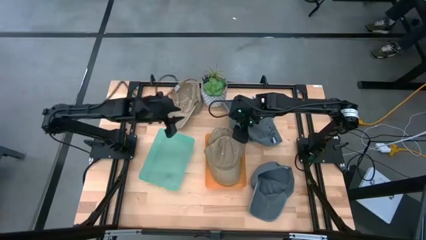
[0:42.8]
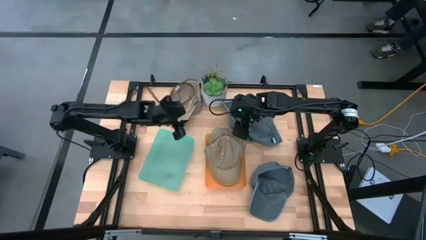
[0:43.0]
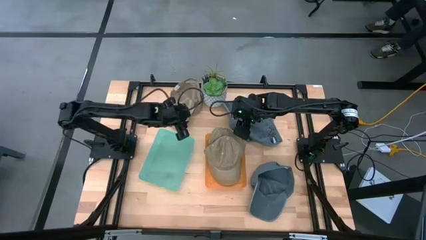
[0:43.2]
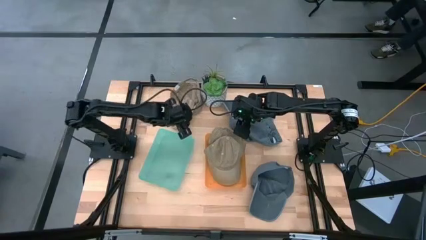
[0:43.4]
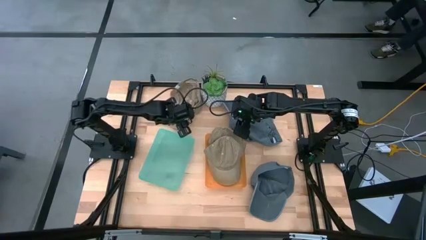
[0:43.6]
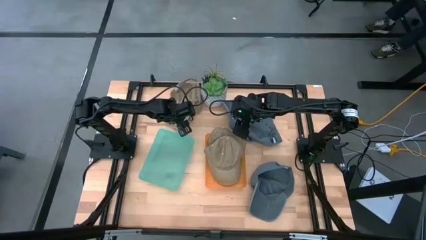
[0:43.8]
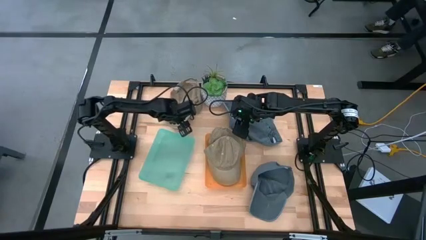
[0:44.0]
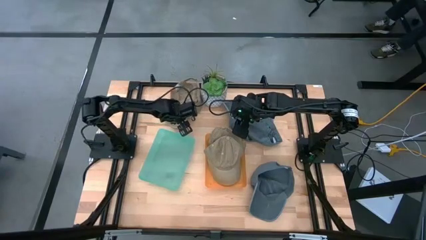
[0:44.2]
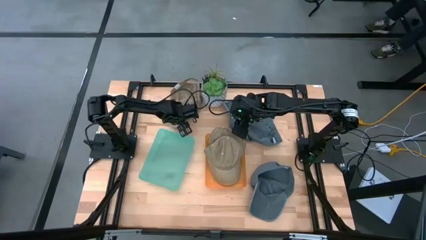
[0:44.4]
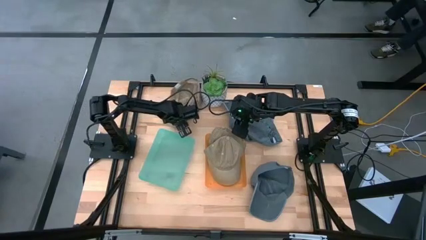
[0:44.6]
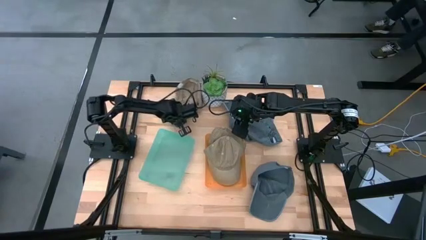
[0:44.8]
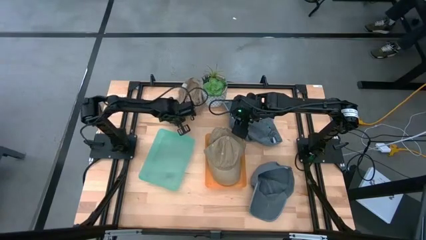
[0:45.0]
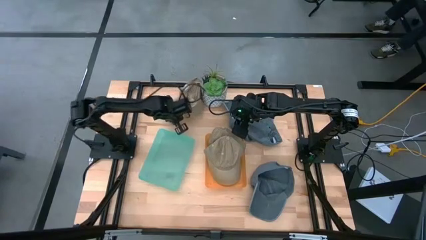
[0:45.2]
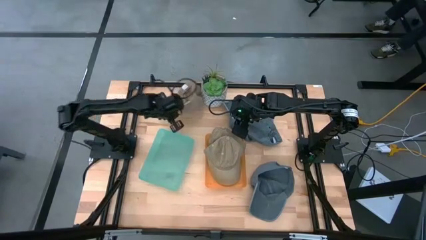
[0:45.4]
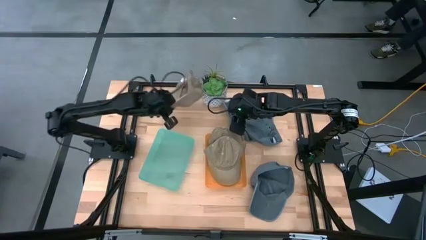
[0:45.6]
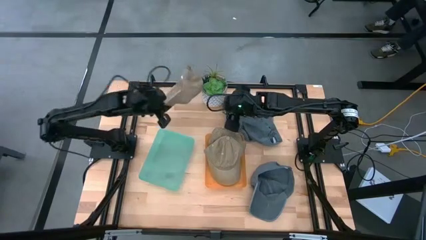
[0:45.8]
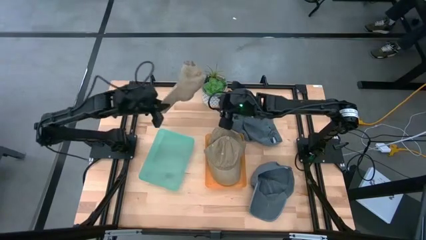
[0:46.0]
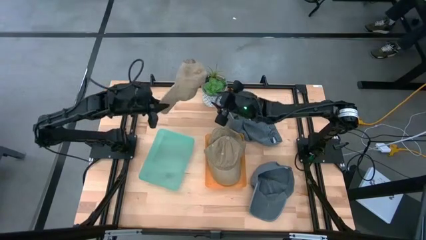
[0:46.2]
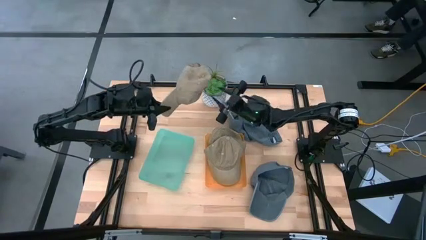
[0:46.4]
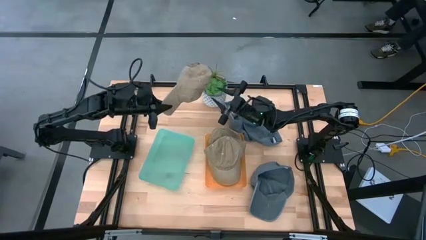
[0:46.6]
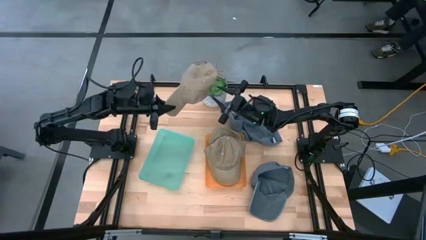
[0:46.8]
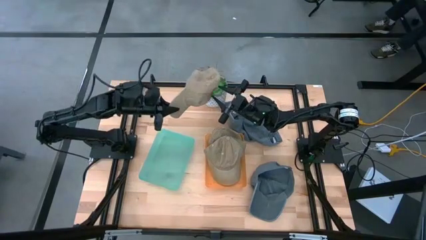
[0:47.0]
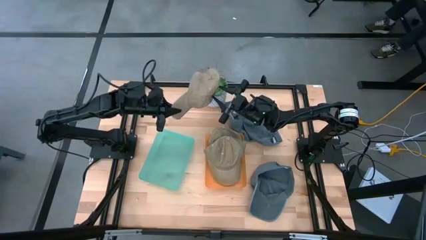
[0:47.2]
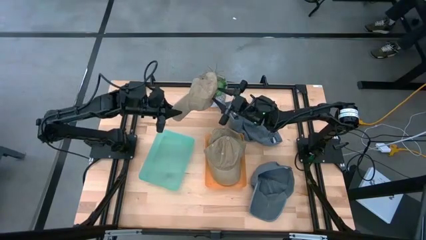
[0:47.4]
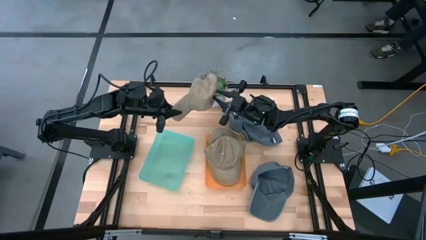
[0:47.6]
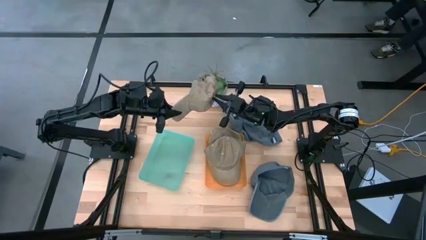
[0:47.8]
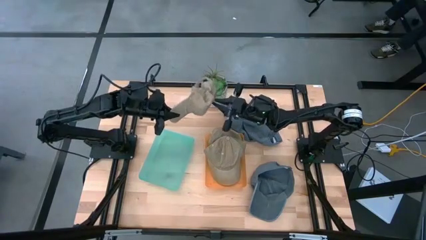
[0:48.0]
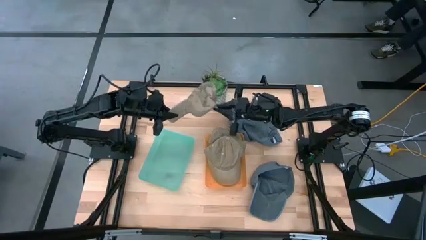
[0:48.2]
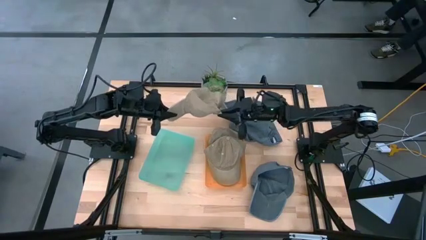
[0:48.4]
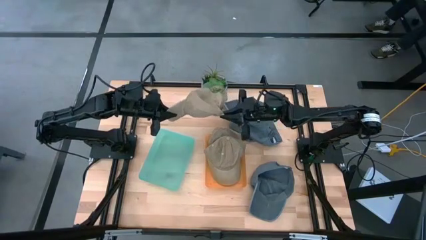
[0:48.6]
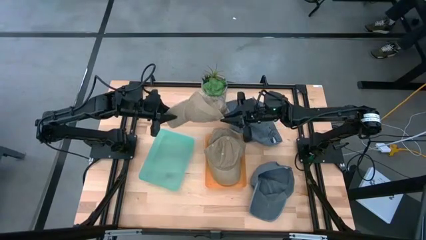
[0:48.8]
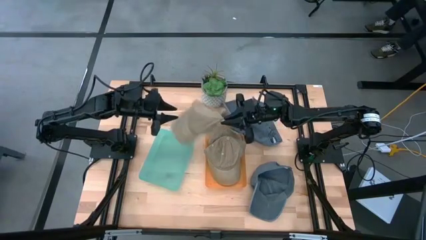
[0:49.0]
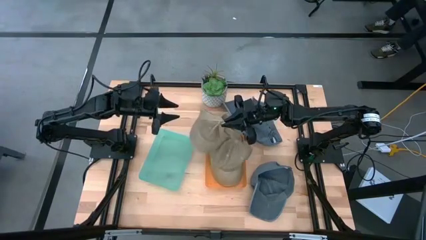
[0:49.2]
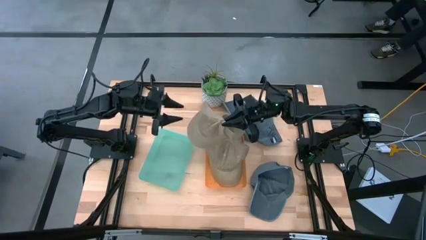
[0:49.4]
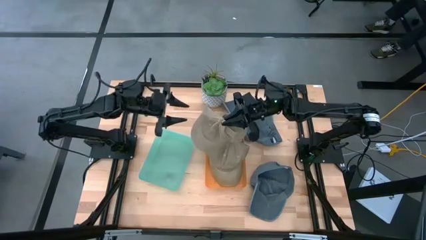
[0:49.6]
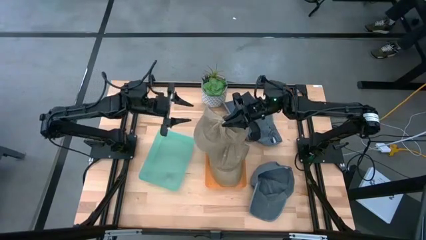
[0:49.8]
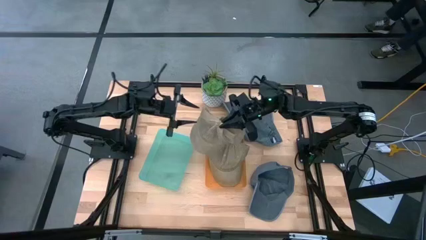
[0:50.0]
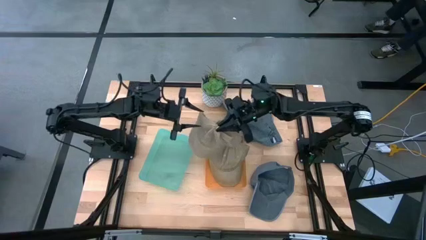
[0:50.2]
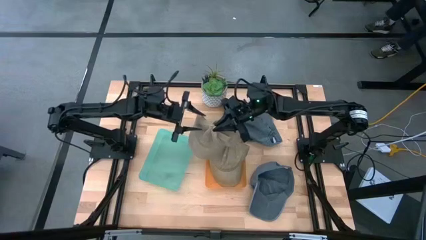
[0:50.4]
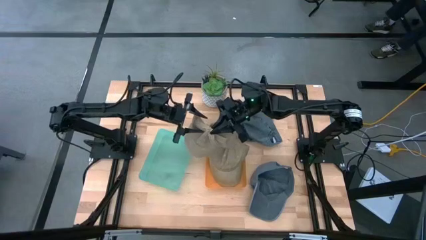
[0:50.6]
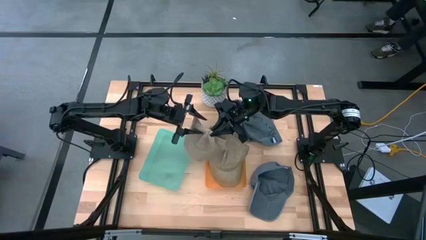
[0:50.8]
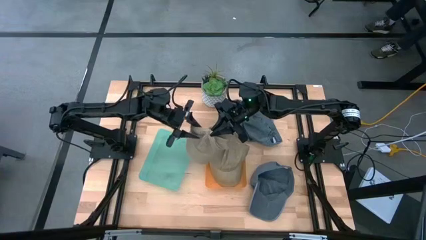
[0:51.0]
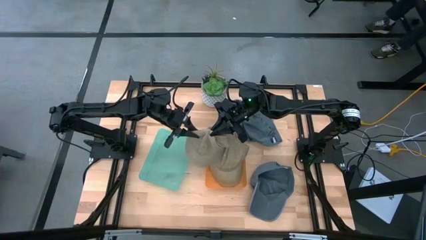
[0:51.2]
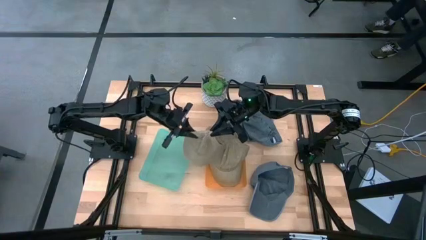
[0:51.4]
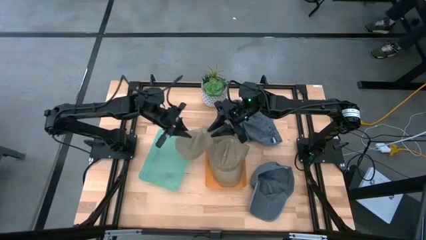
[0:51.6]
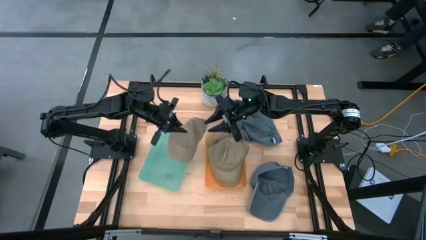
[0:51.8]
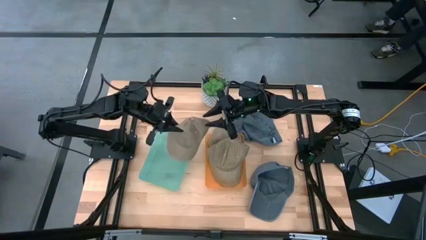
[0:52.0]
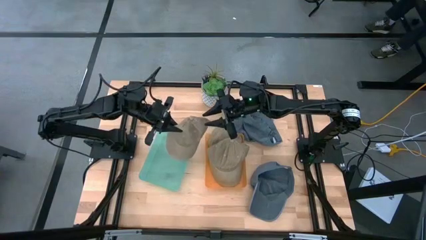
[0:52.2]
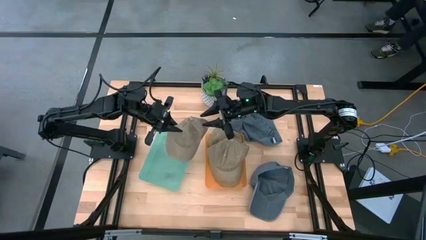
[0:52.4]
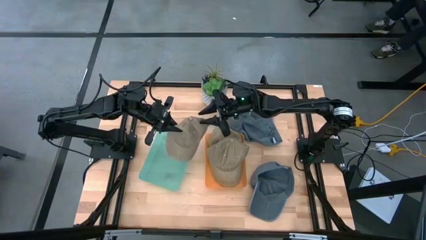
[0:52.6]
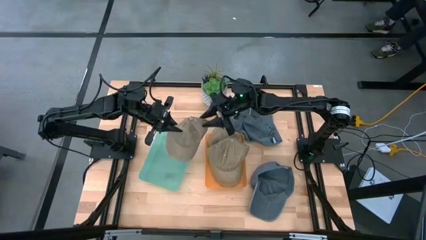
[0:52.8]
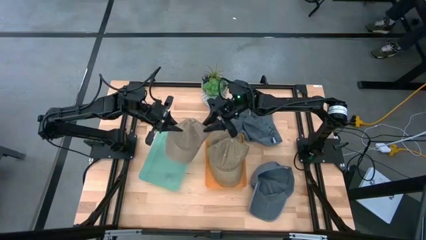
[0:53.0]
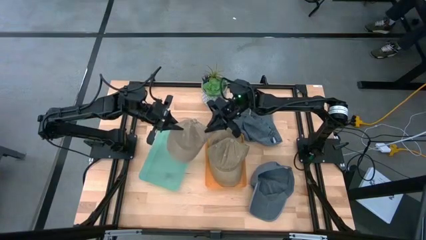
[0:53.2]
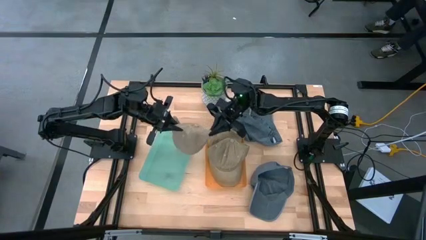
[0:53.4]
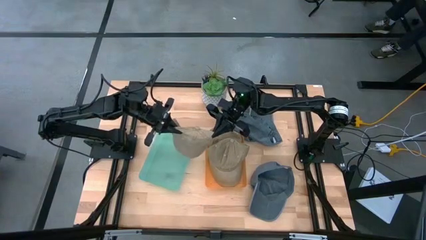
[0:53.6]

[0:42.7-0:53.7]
Task: Pick & Place hat
Put the brown cap into the orange bin
